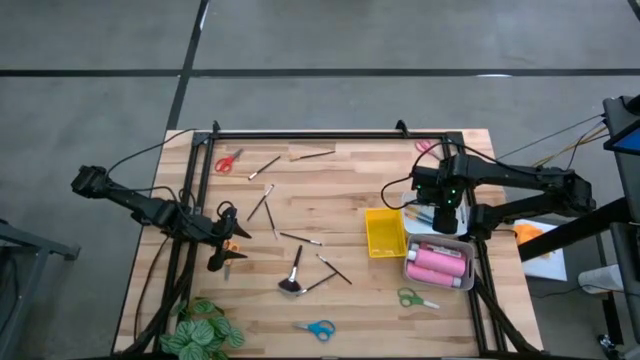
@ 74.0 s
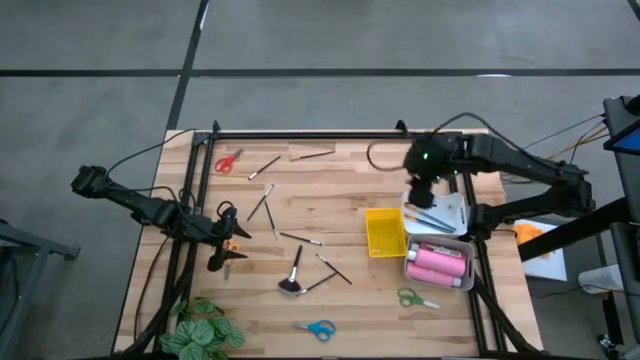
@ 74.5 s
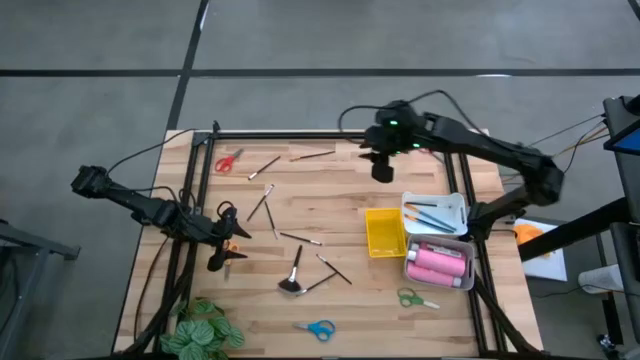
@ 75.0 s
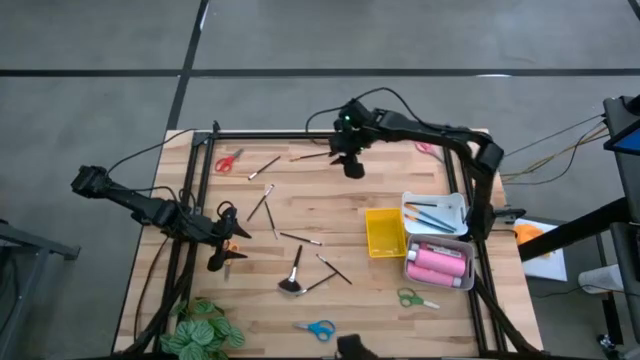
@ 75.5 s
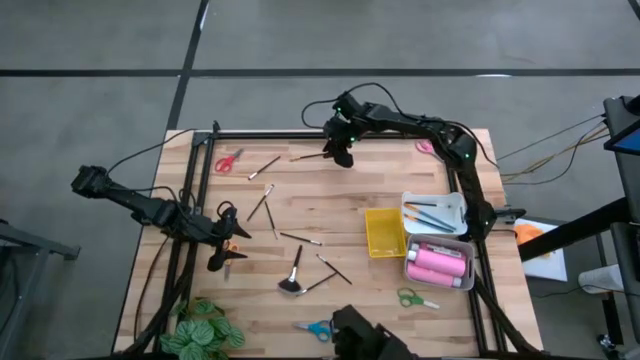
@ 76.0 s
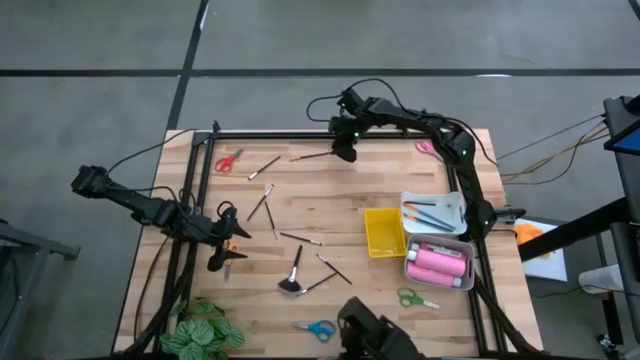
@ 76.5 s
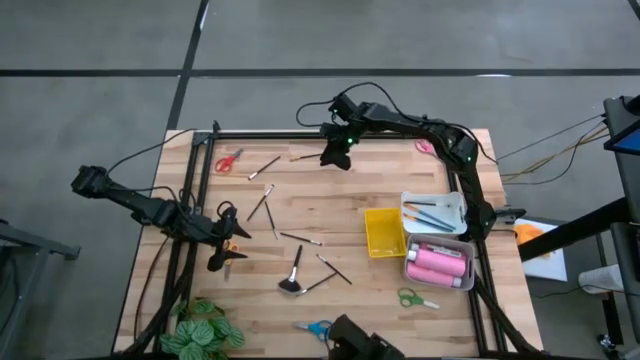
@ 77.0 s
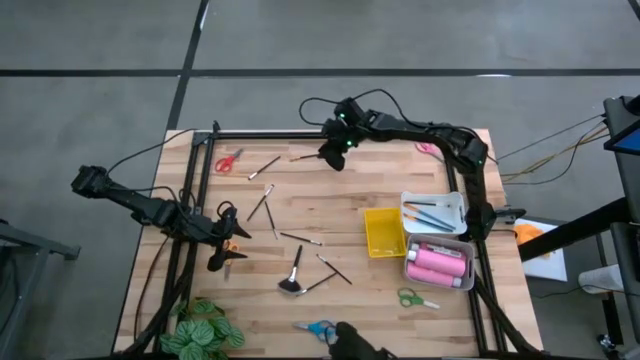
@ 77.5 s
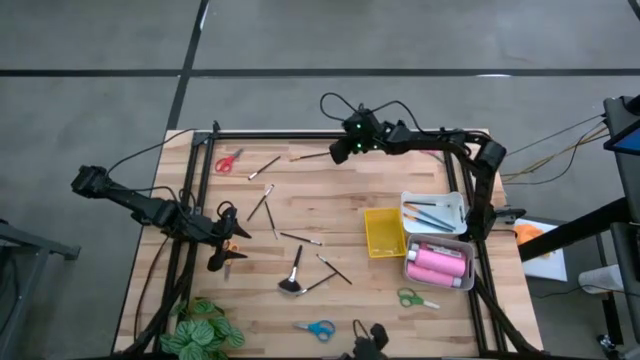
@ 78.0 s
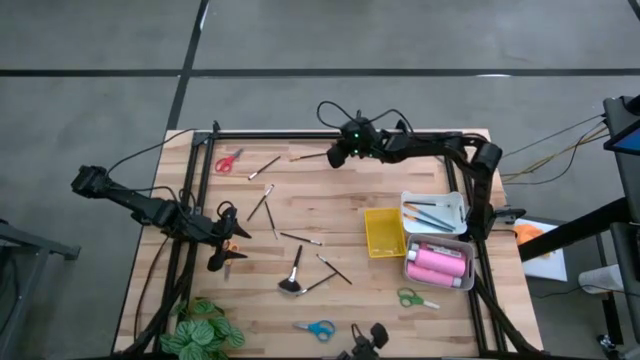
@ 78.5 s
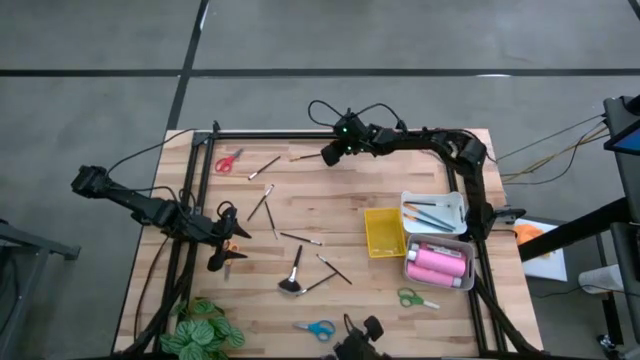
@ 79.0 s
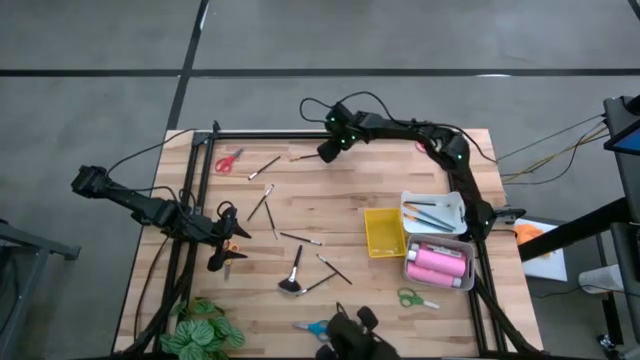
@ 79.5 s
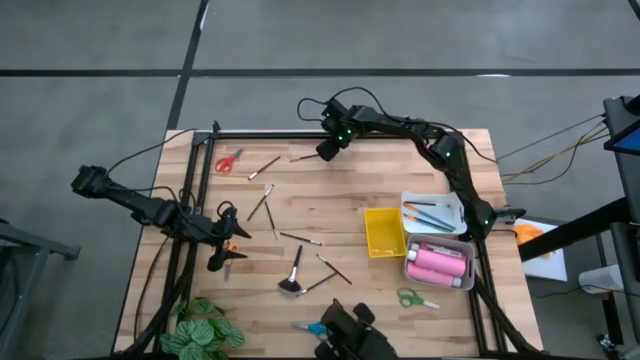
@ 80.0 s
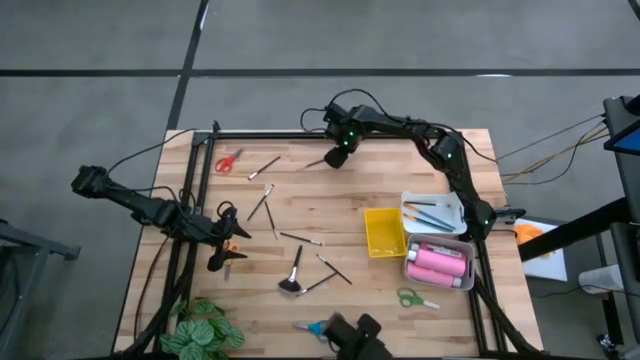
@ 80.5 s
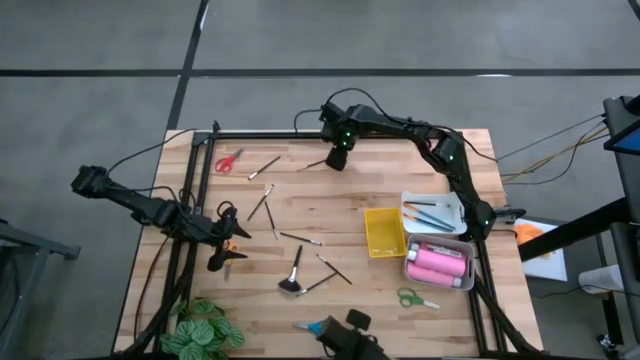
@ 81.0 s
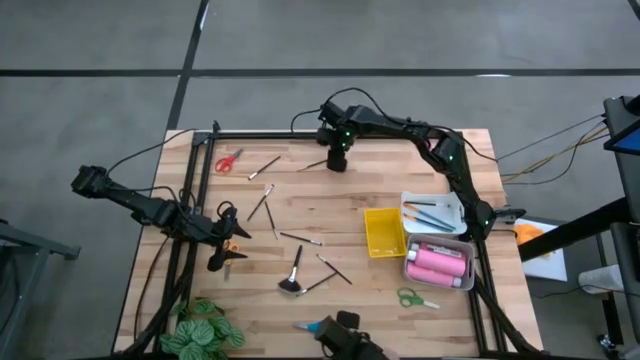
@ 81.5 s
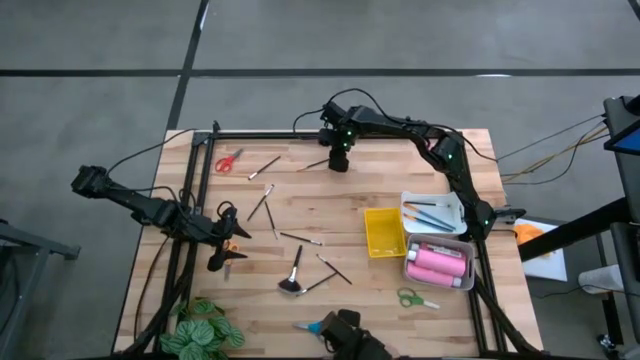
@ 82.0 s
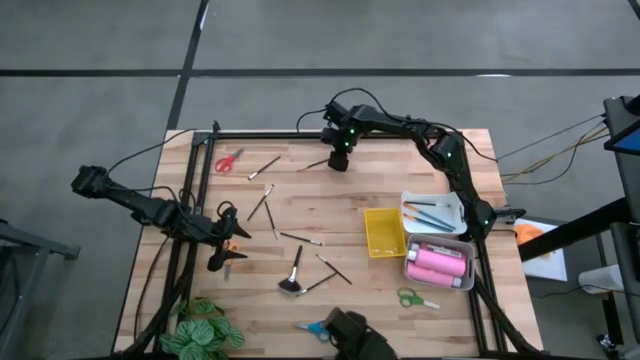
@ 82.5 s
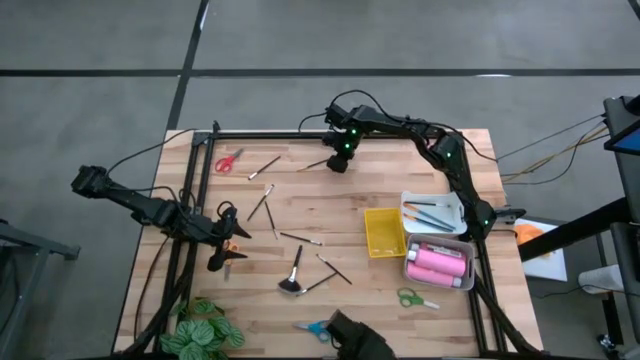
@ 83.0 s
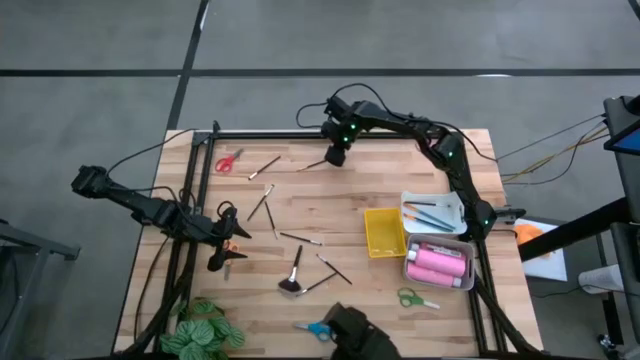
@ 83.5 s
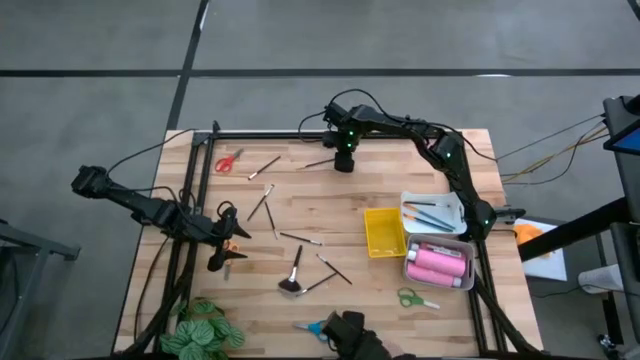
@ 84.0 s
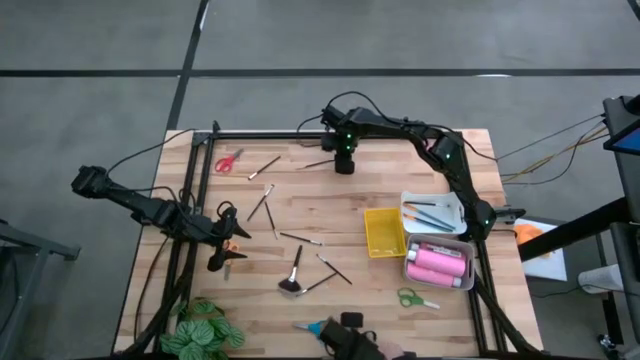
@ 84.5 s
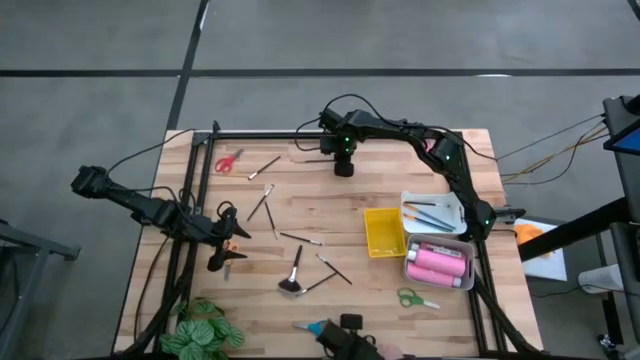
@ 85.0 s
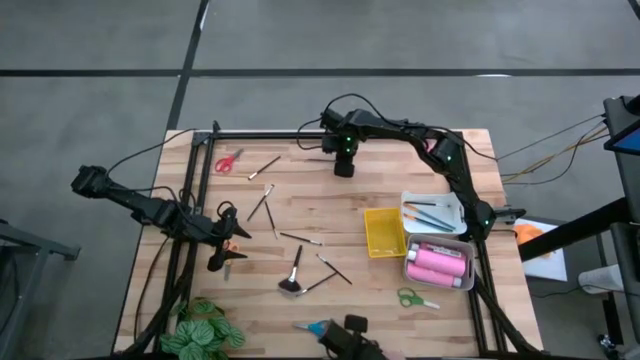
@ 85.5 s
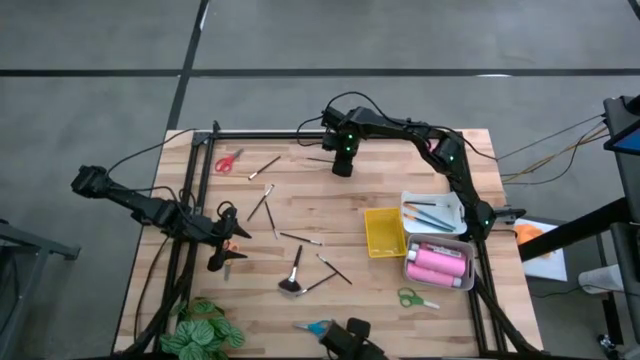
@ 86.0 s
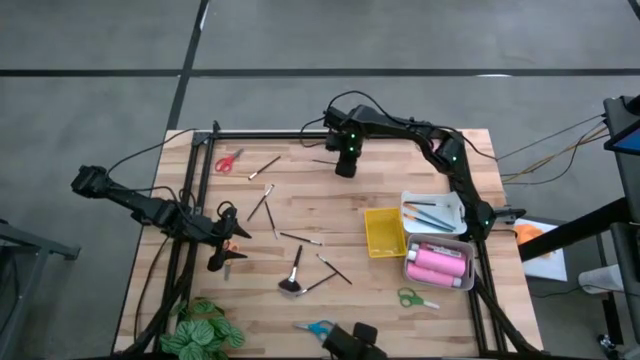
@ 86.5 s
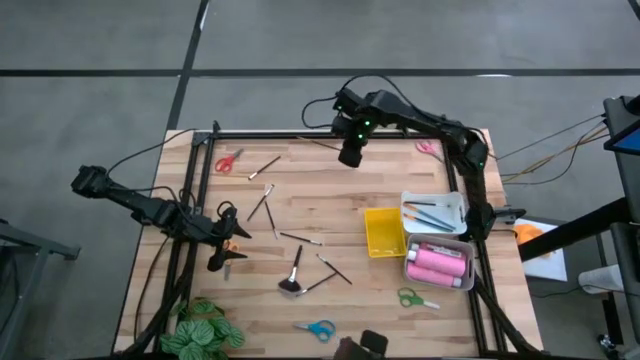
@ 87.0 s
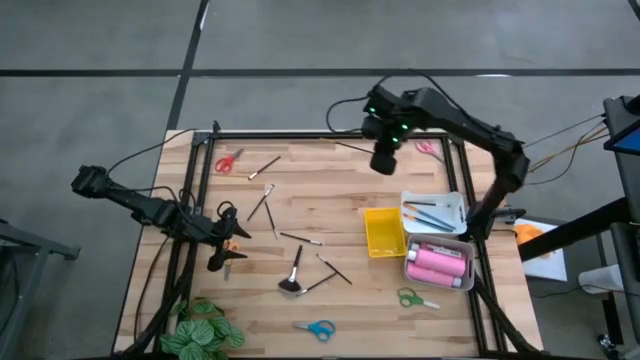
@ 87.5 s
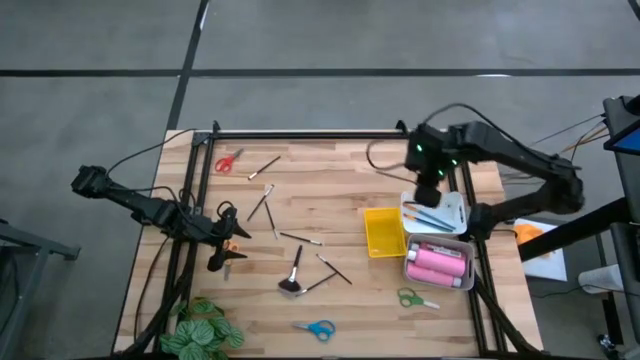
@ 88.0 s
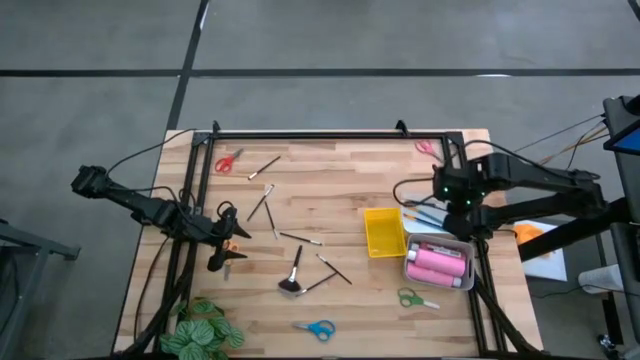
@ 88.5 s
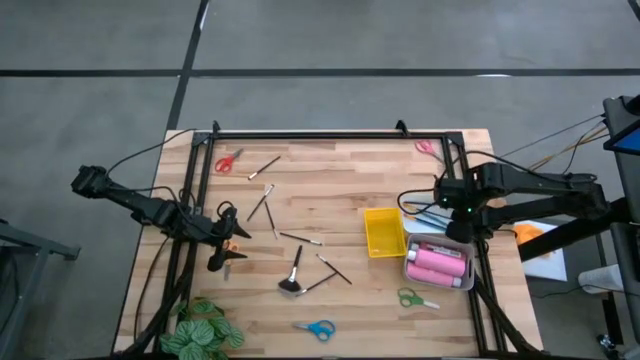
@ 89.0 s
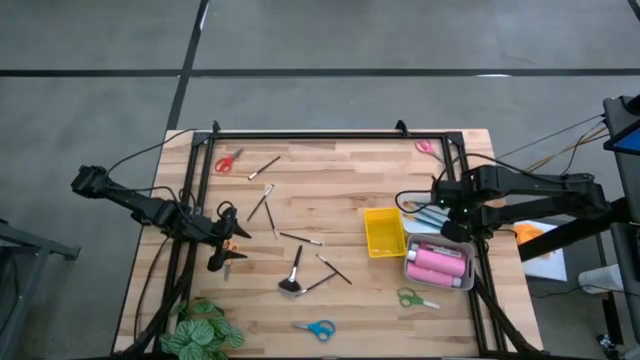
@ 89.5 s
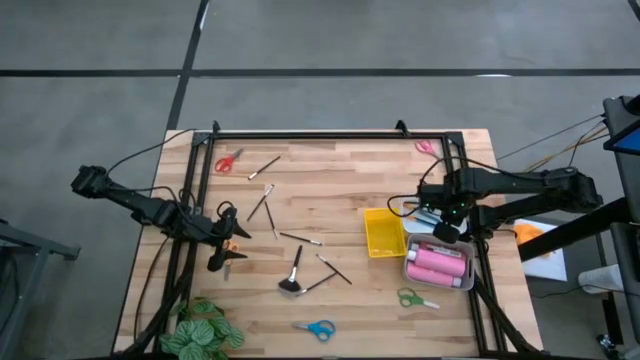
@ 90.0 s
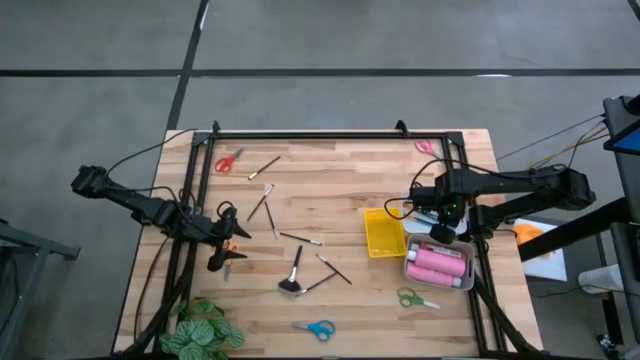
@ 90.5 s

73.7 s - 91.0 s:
Task: Pick & Place Paint Supplies
Put the black paint brush into the white bin

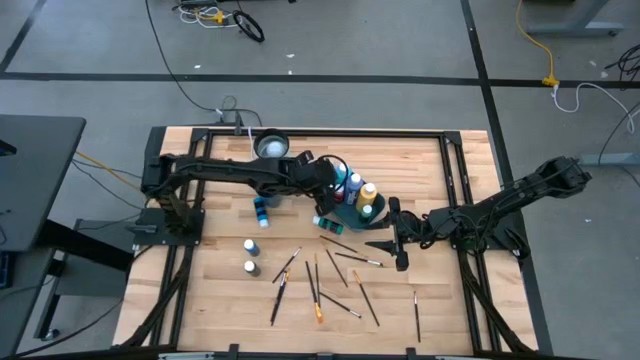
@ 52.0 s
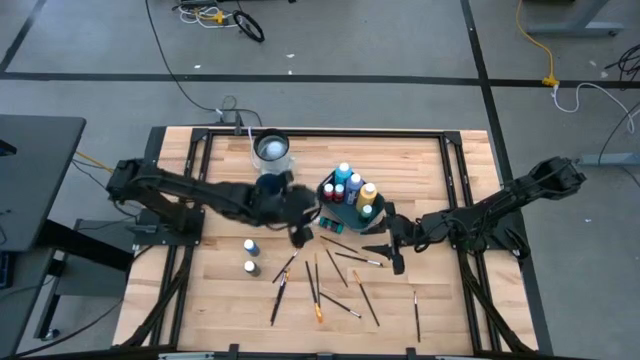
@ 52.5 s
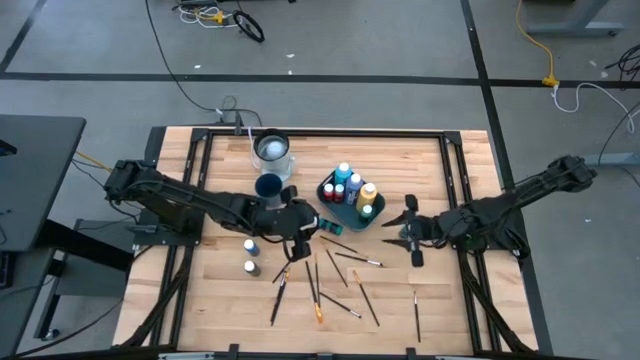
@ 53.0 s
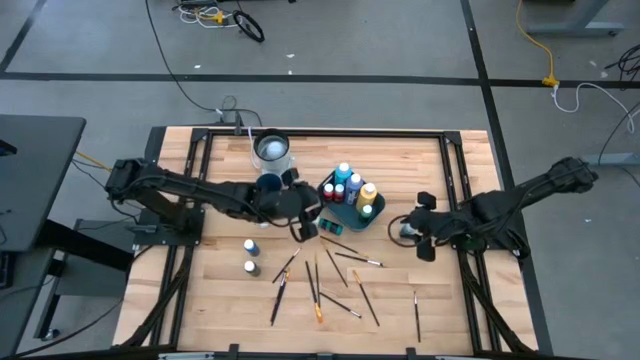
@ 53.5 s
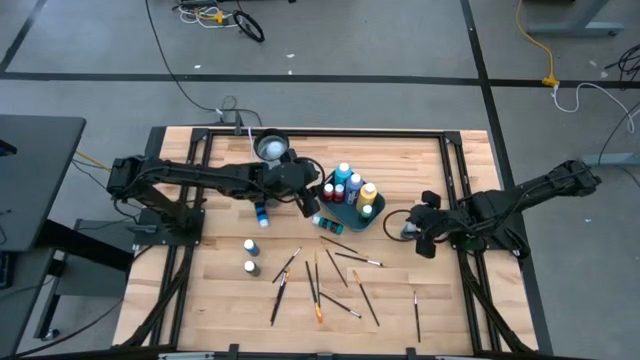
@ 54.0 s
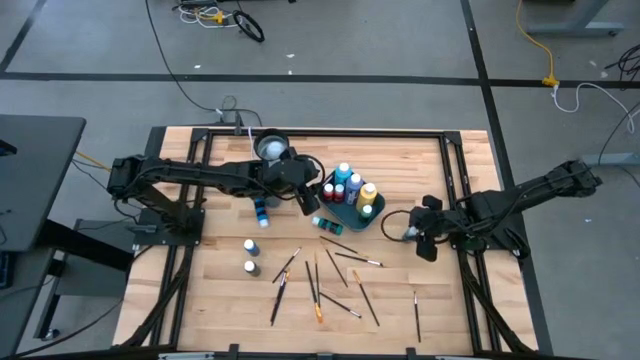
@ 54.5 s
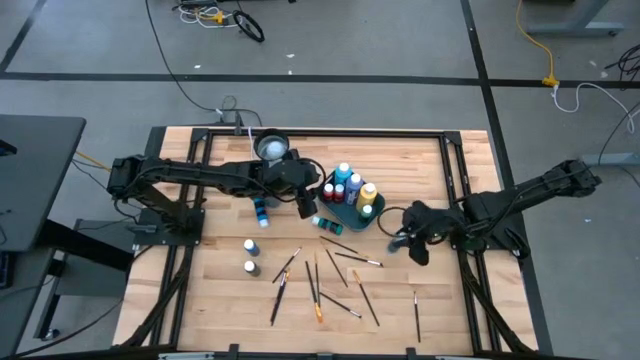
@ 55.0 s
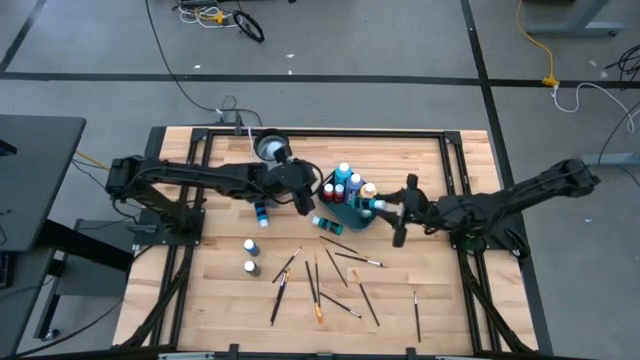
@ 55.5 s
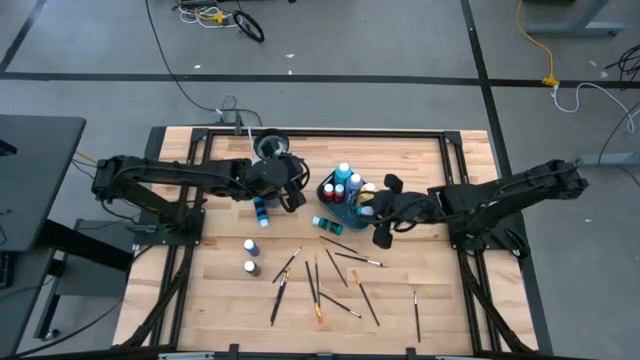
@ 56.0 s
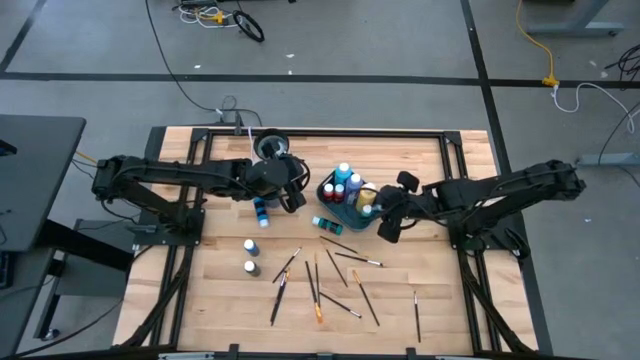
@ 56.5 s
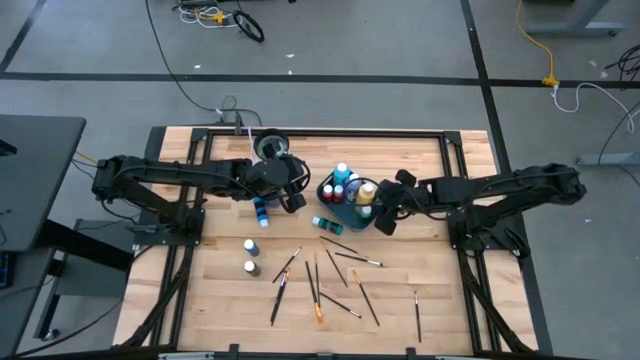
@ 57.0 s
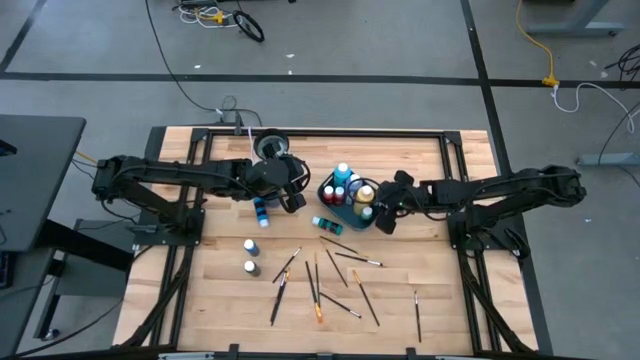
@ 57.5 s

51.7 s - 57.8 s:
Task: Pick & Place Paint Supplies
Put the small light blue paint bottle into the blue bin
